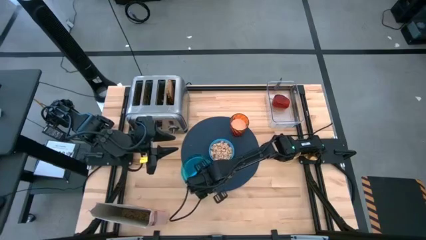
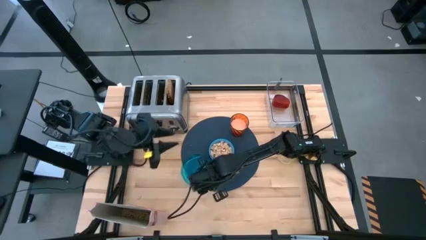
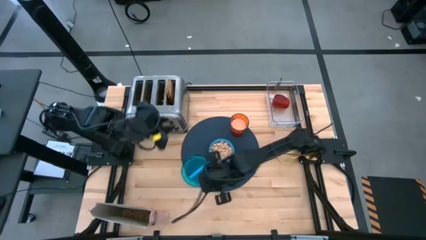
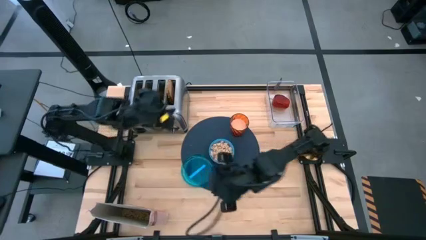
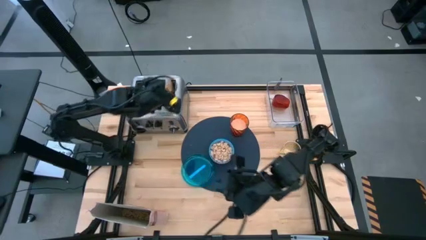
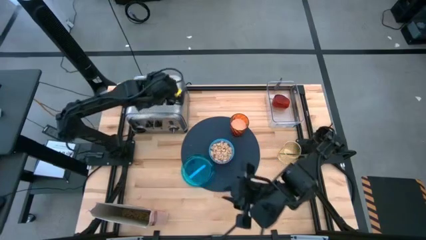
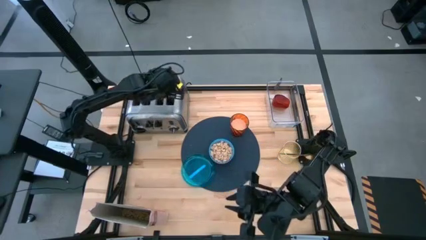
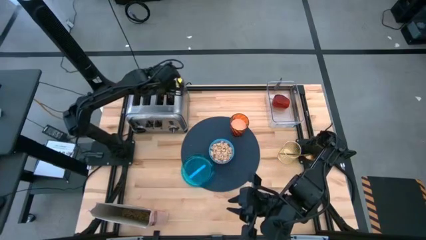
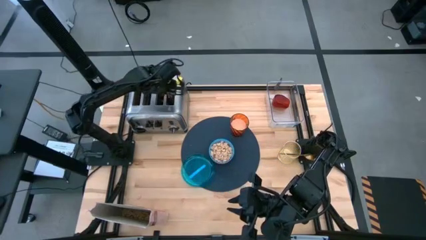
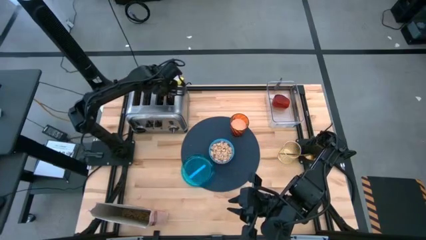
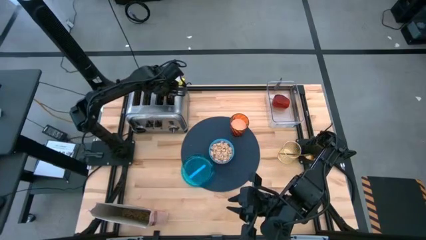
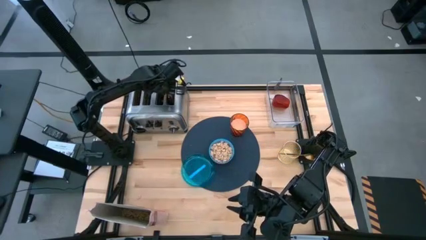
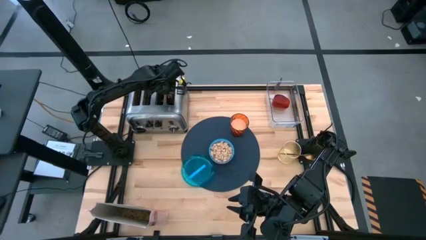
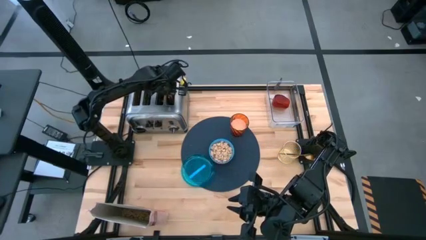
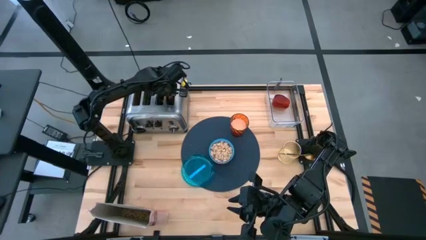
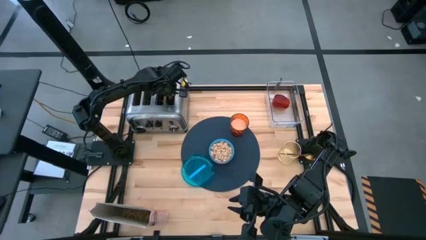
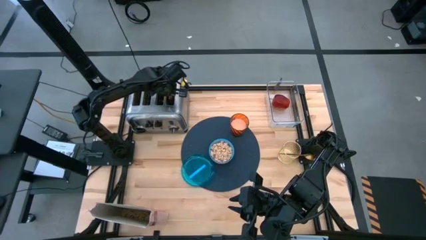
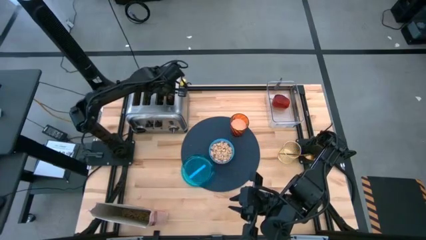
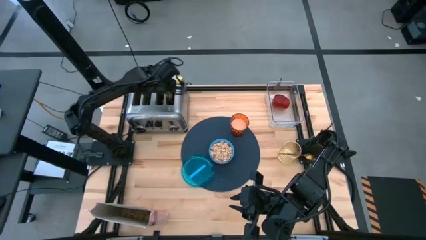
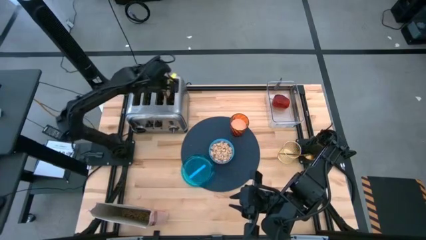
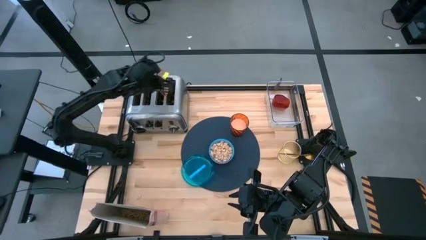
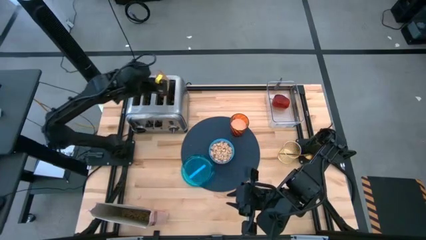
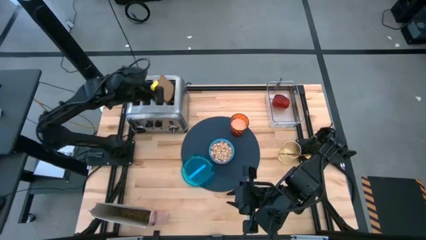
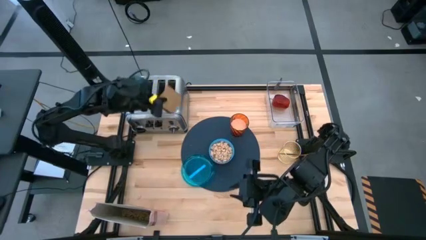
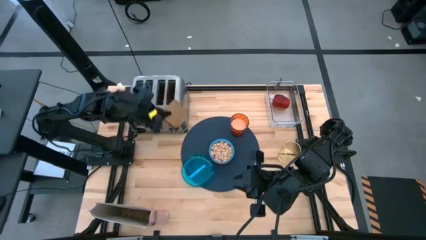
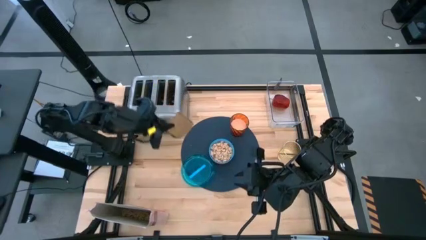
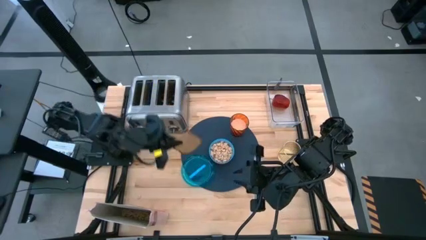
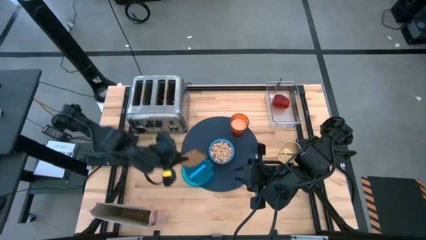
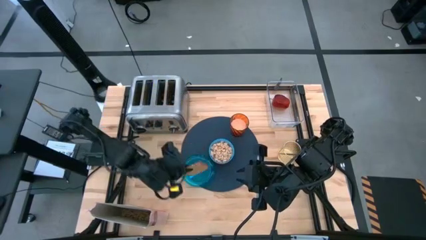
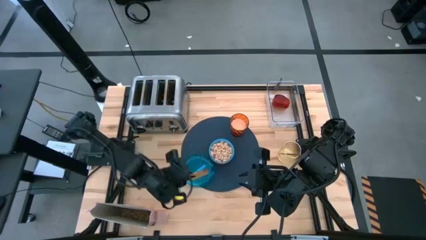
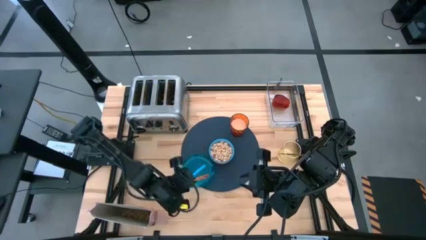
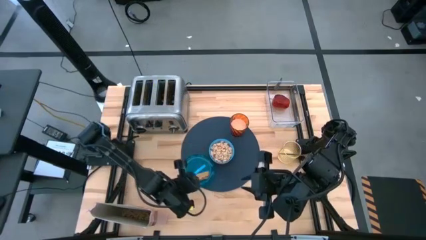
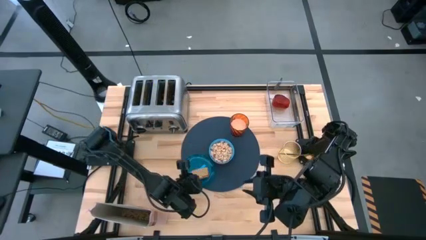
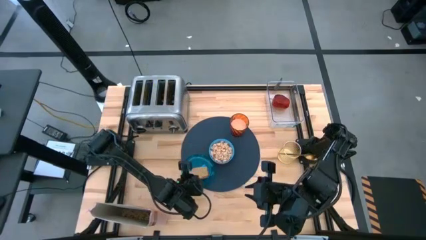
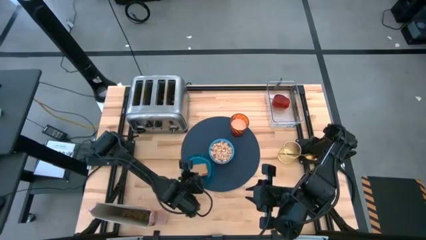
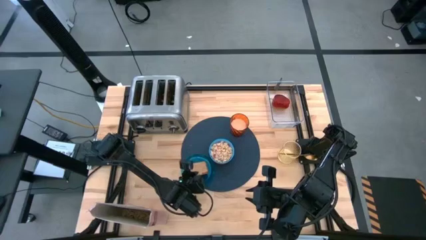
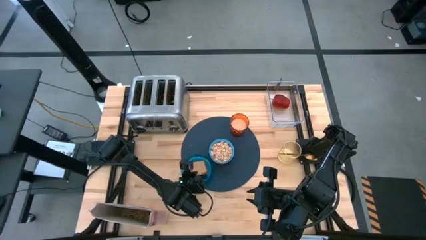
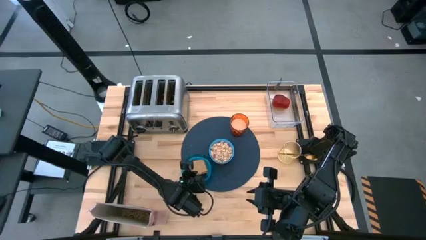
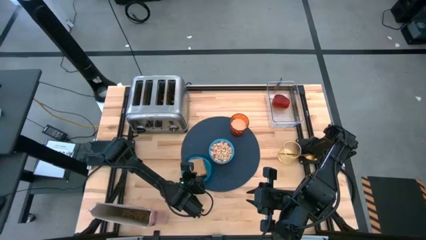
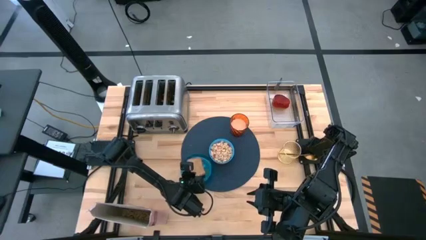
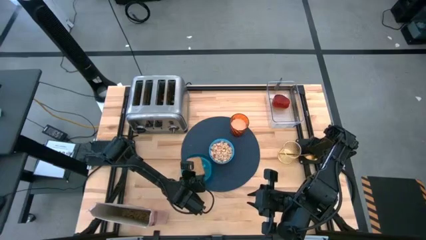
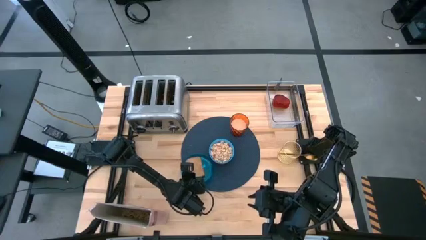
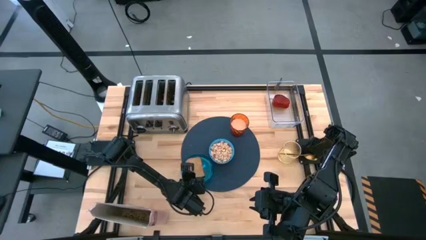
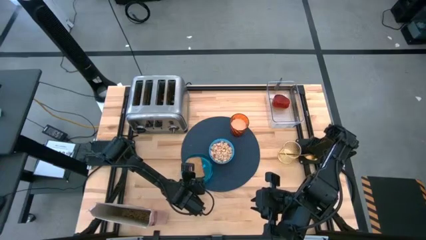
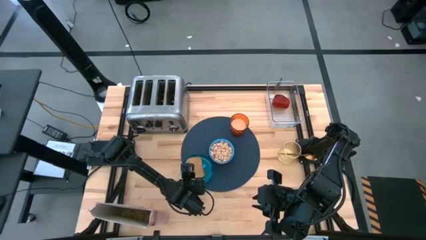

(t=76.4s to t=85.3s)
Task: Arrange a breakfast setting
Put the toasted bread on the blue plate

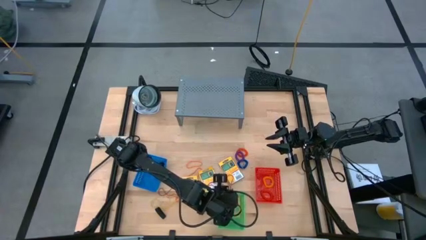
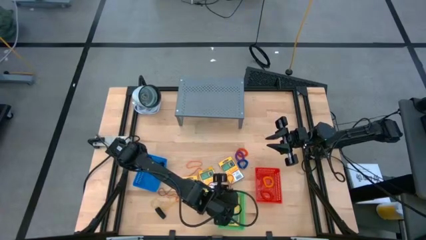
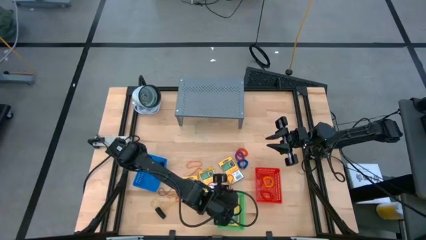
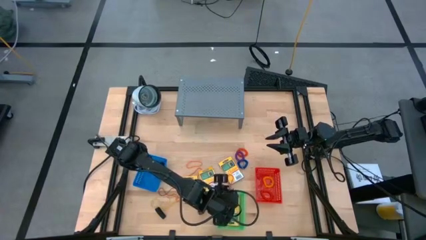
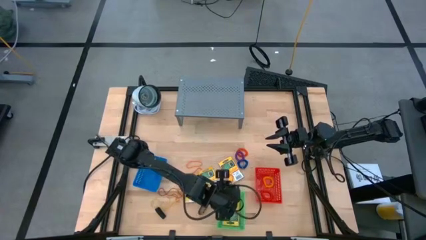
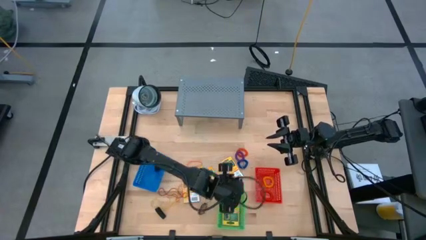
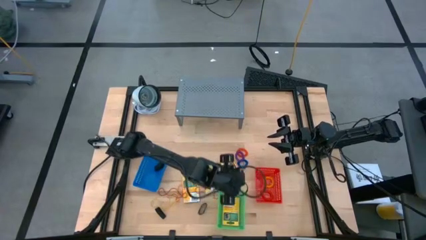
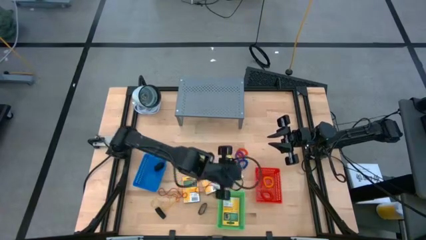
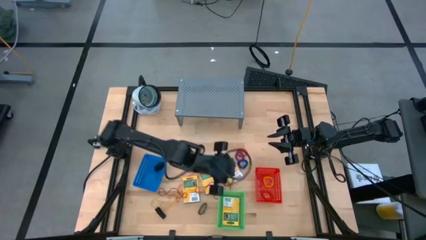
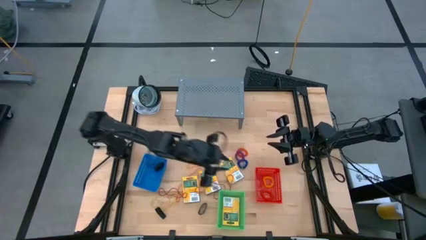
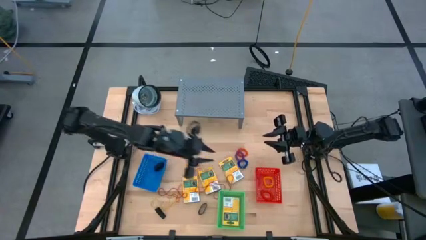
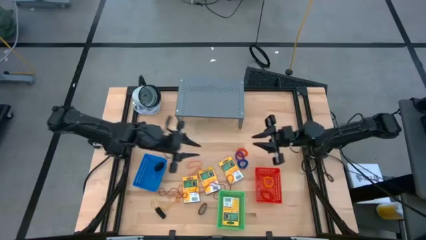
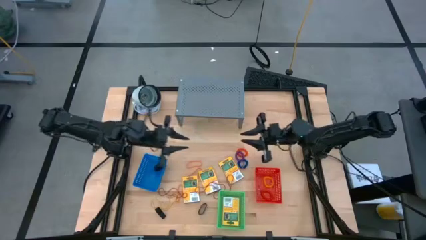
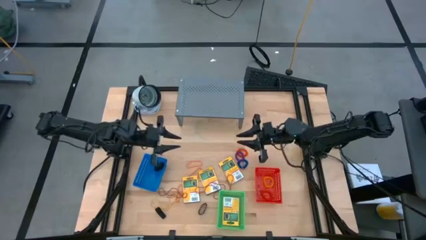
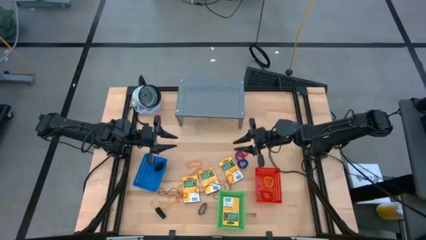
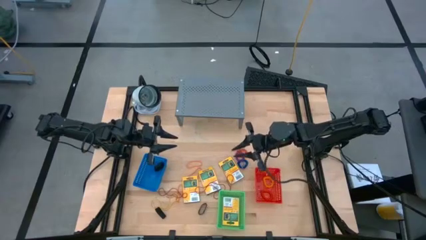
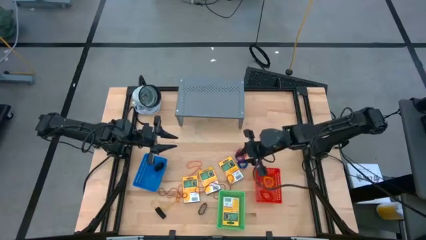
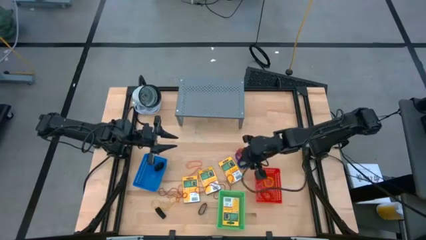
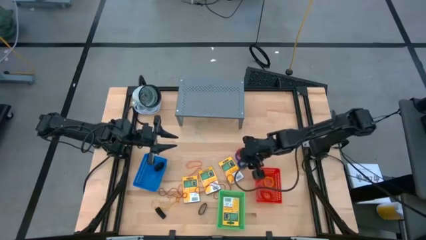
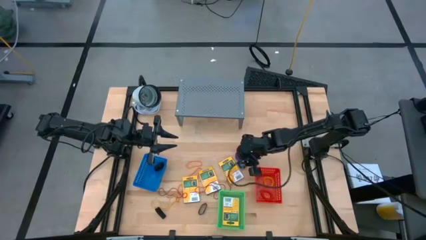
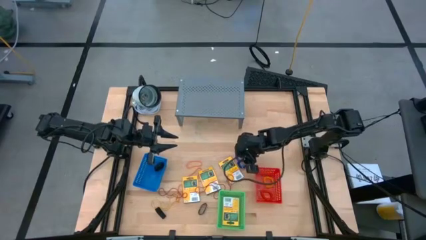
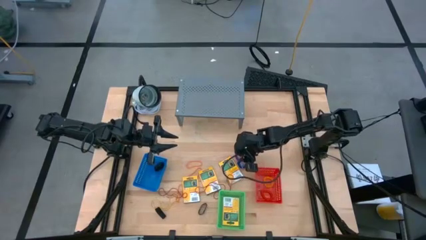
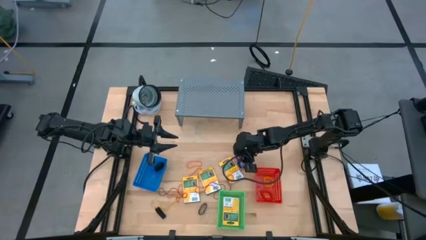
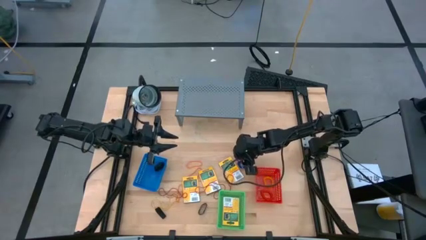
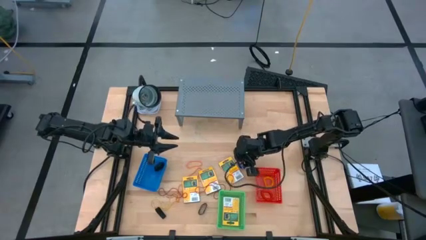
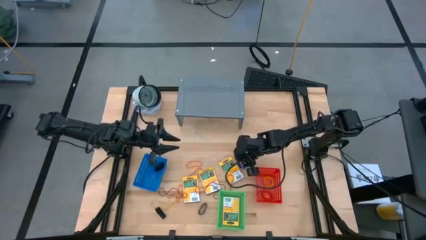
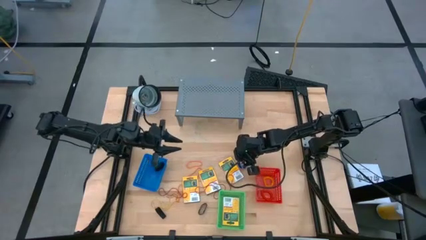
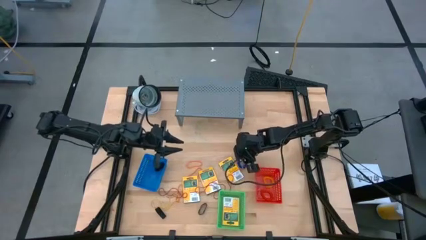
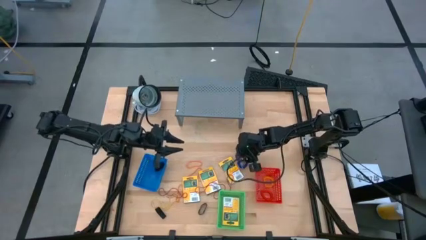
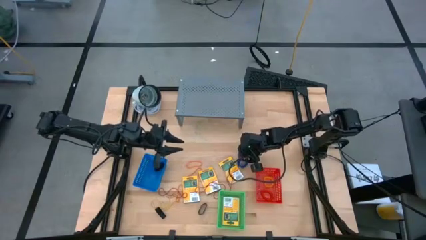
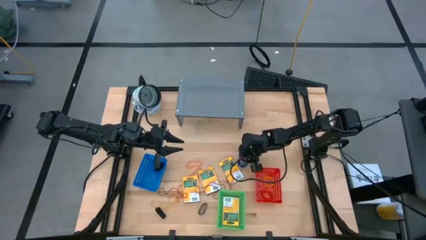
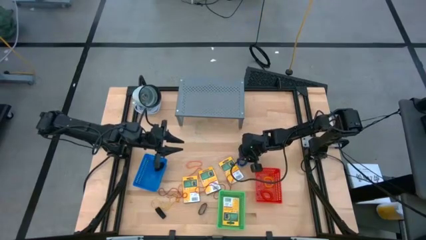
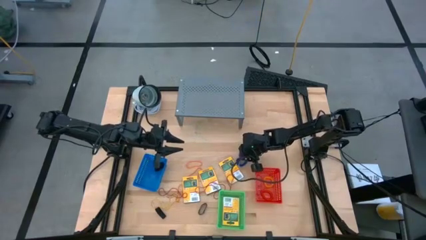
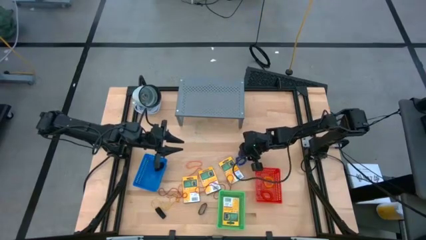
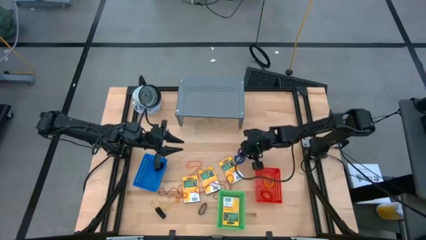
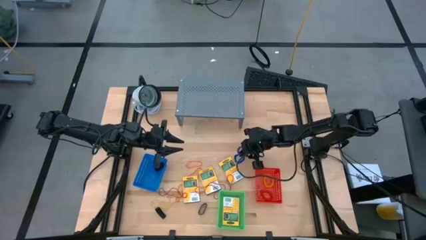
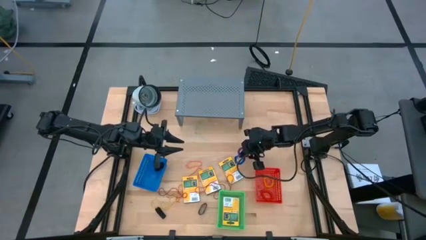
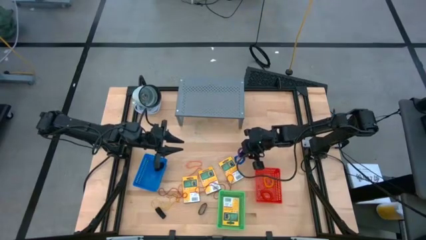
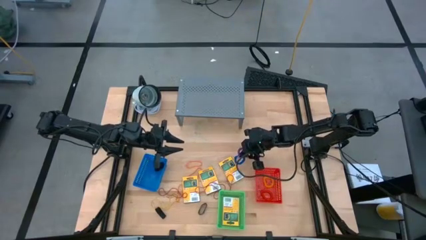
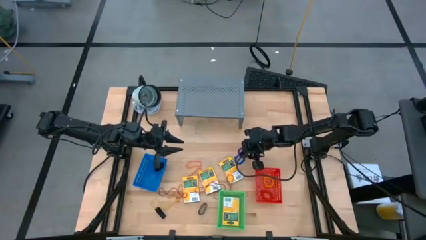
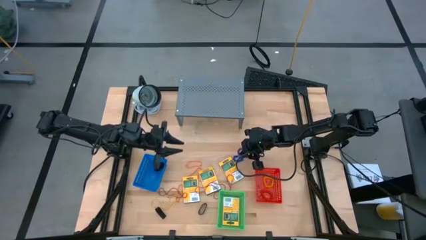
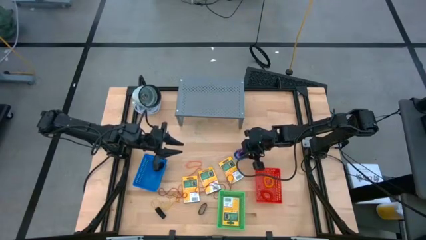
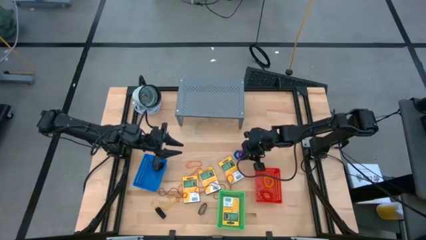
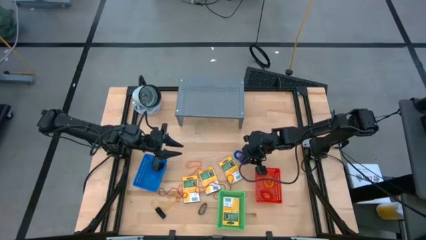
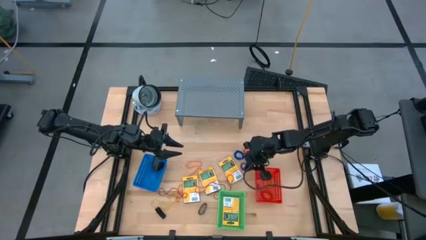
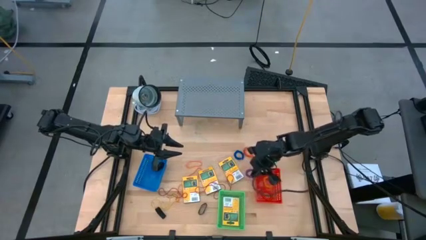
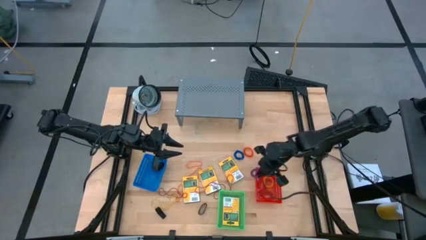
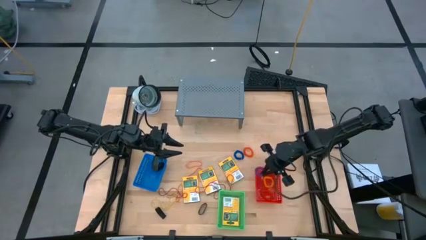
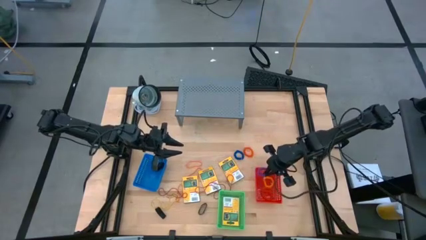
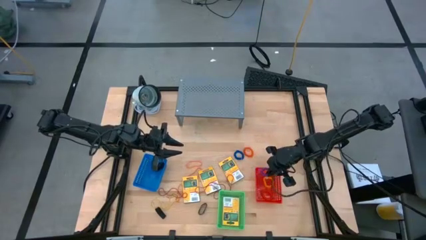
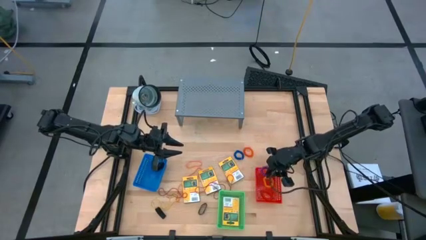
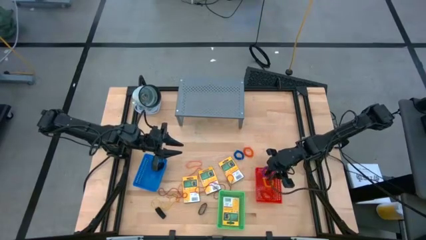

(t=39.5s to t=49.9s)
Task: Pick & Place Office Desk Supplies
Put the violet spring keychain into the red bin
